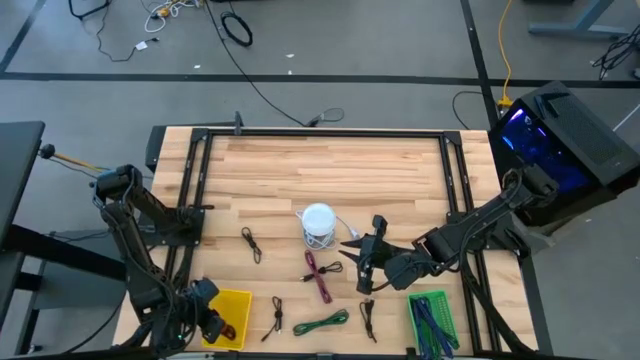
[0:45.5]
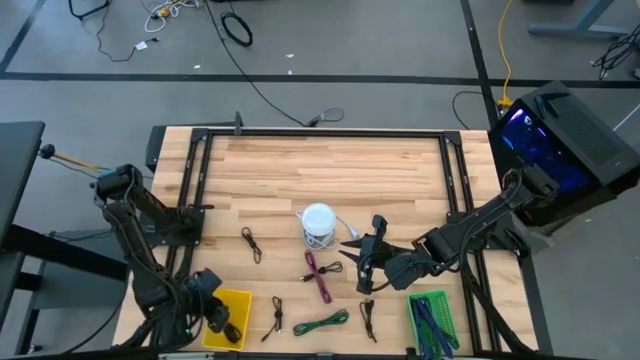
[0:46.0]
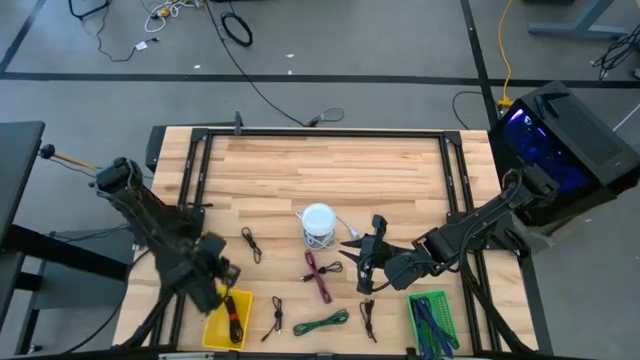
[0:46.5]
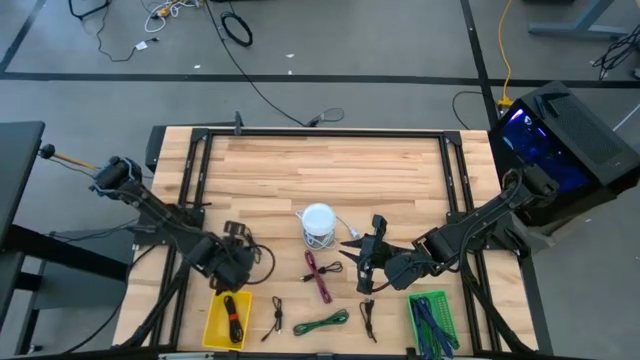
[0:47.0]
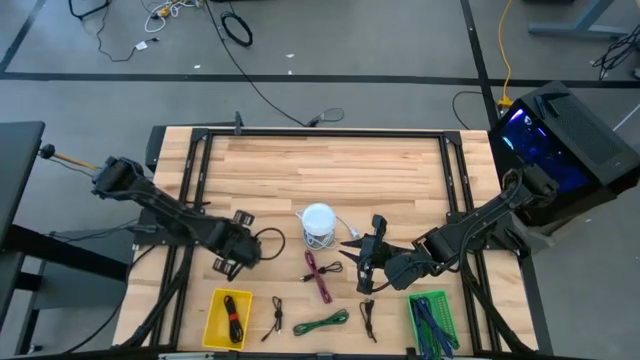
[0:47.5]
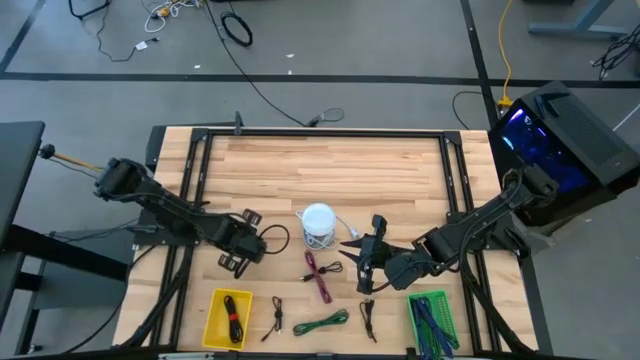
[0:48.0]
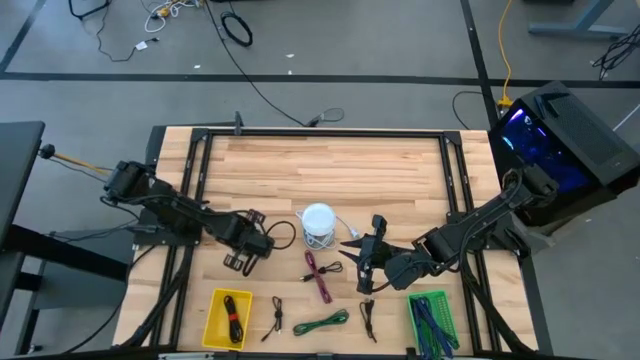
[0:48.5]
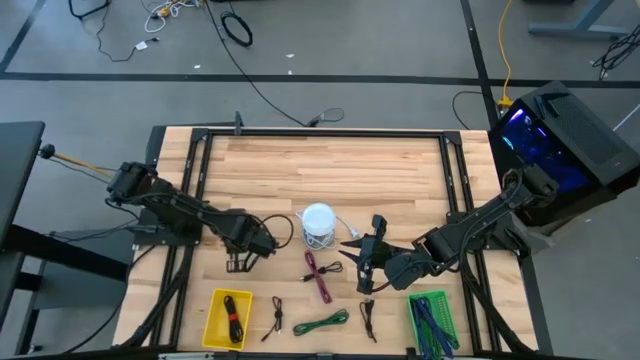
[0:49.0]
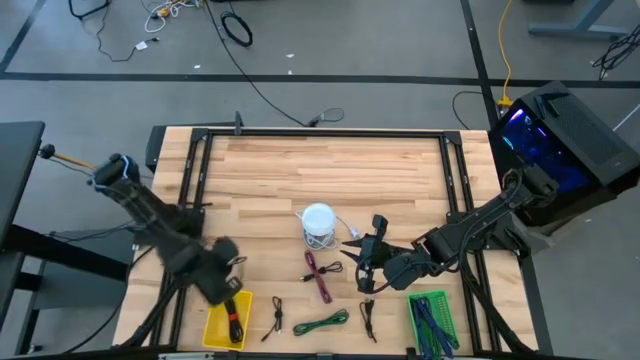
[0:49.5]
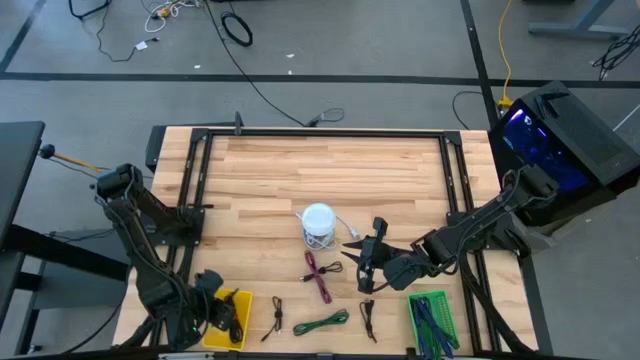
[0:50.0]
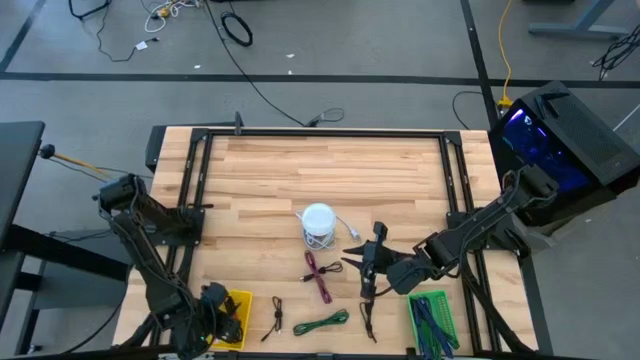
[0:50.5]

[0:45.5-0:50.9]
Task: Pick & Place USB Port
Put the top left black charger cable into the yellow bin

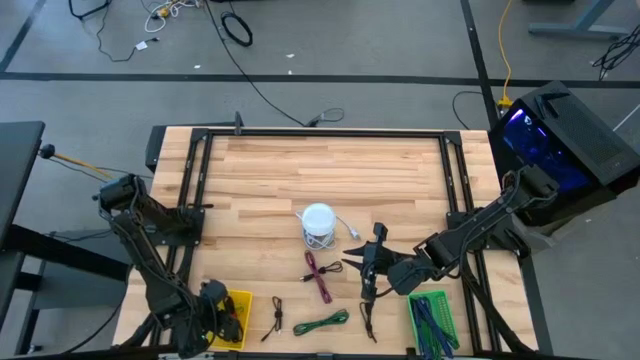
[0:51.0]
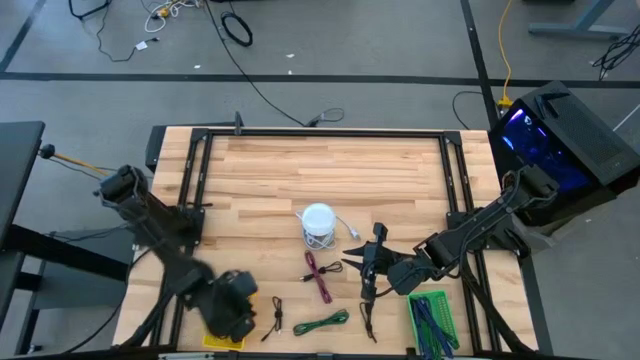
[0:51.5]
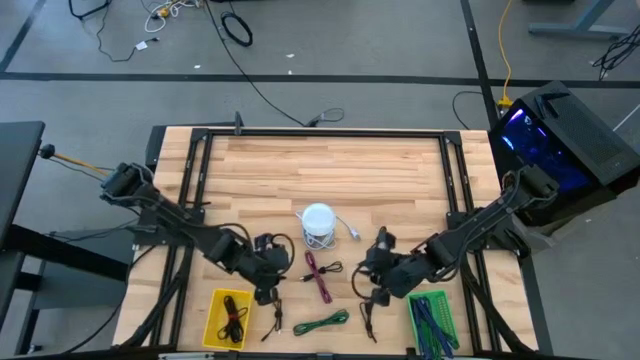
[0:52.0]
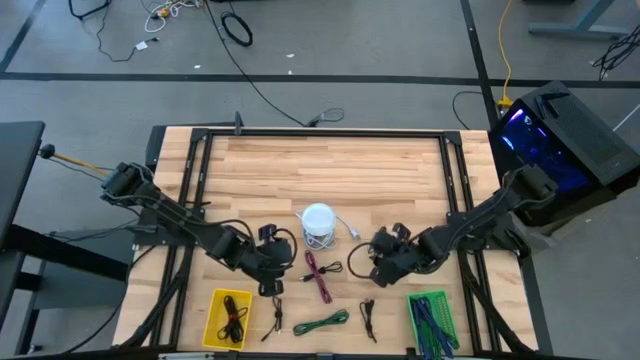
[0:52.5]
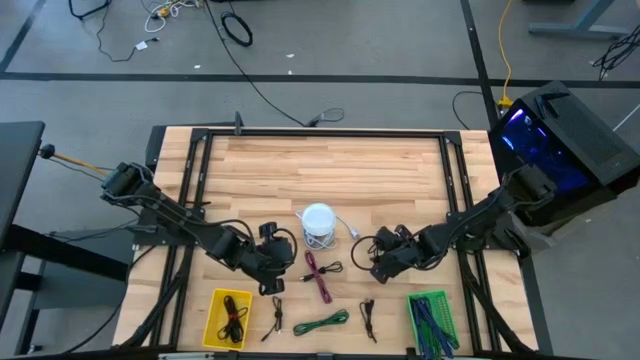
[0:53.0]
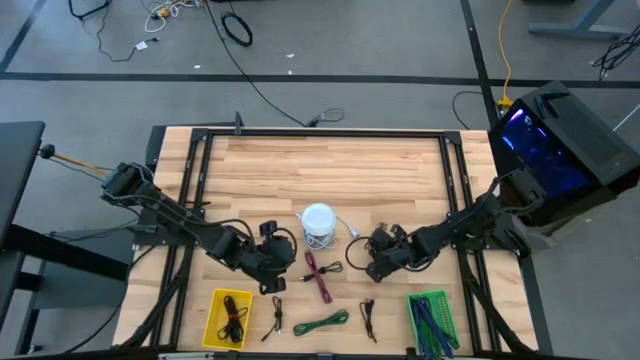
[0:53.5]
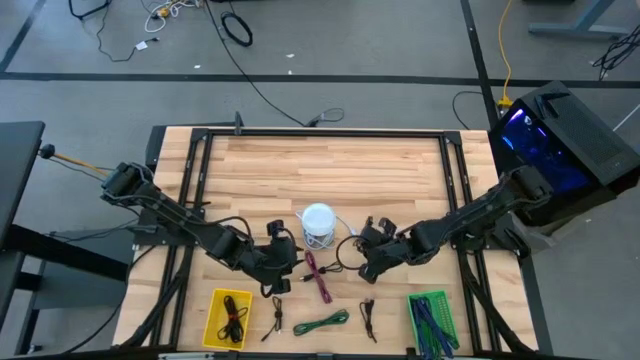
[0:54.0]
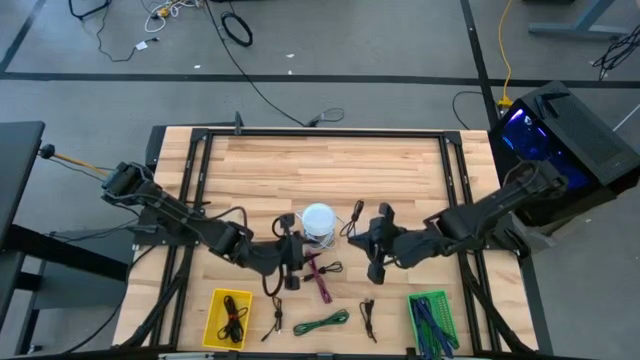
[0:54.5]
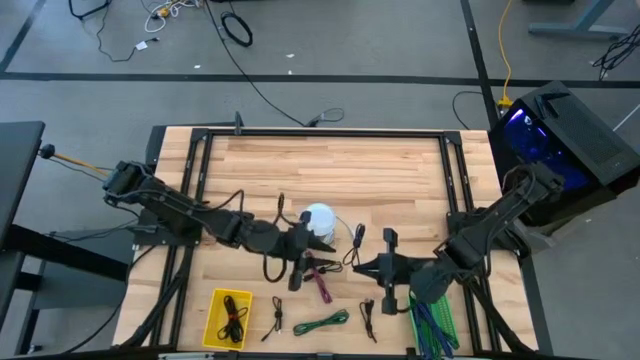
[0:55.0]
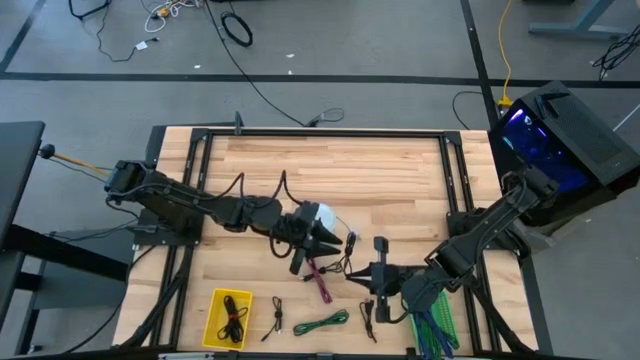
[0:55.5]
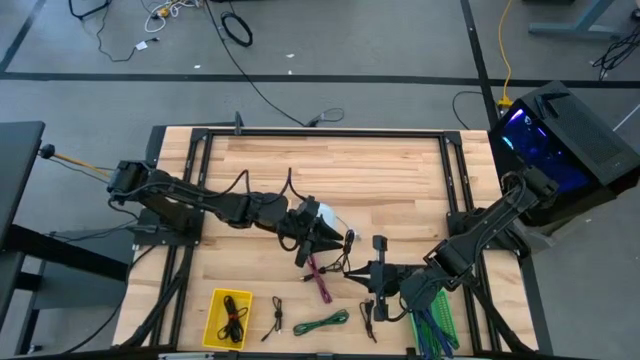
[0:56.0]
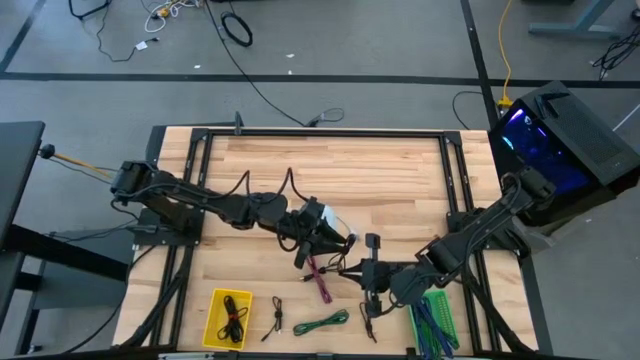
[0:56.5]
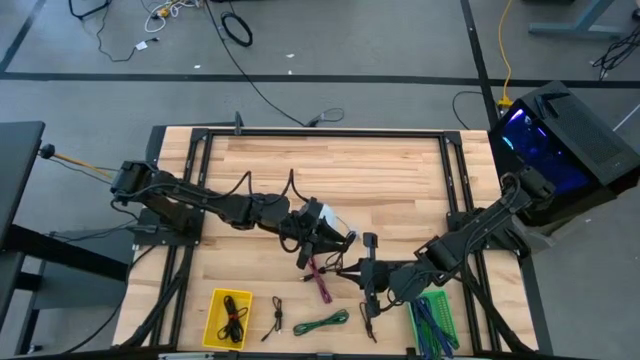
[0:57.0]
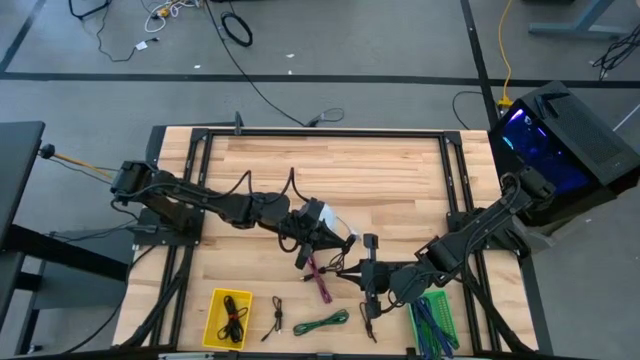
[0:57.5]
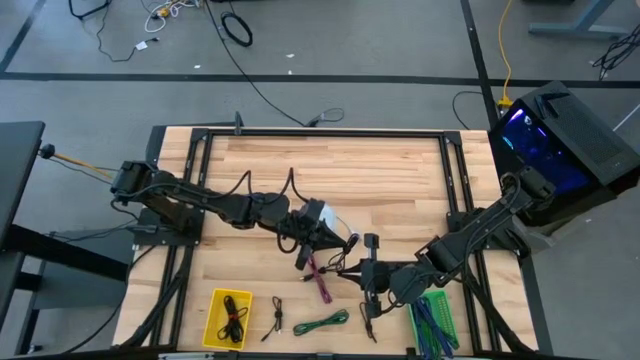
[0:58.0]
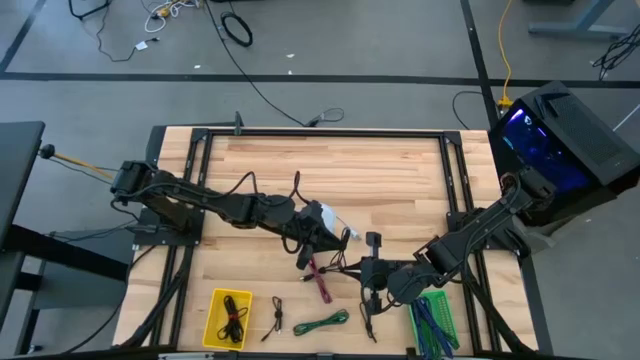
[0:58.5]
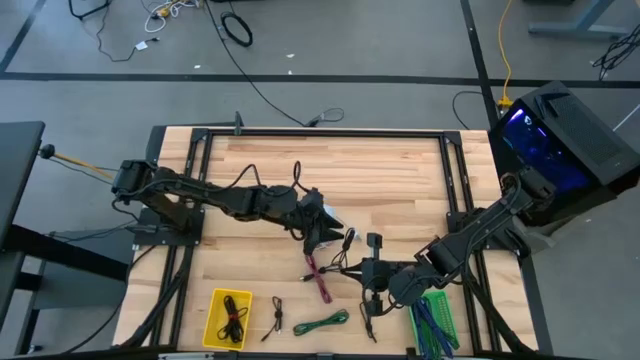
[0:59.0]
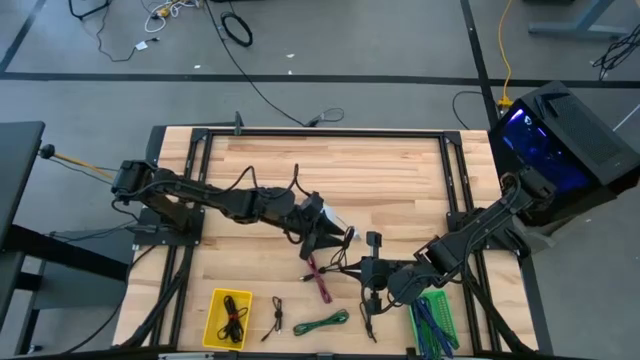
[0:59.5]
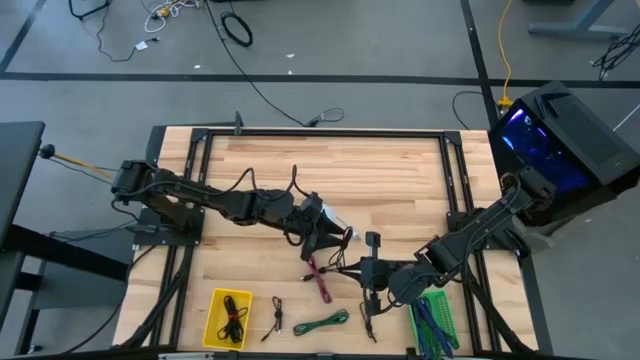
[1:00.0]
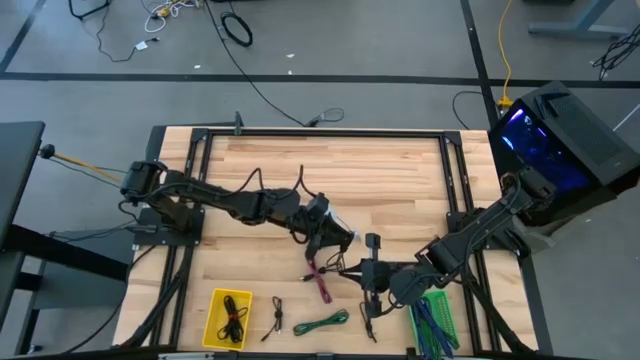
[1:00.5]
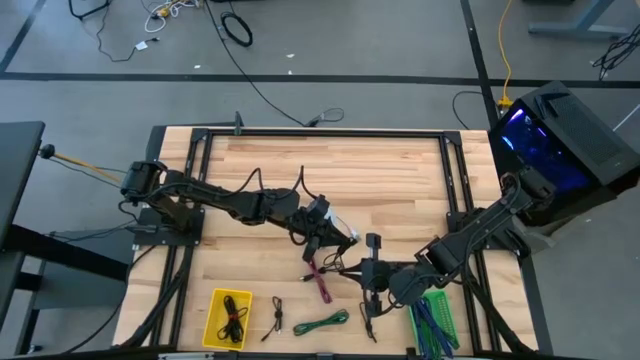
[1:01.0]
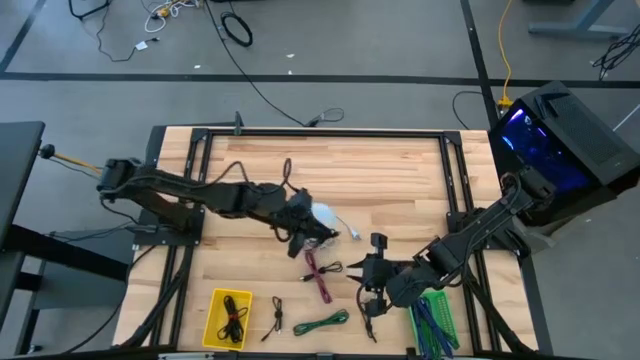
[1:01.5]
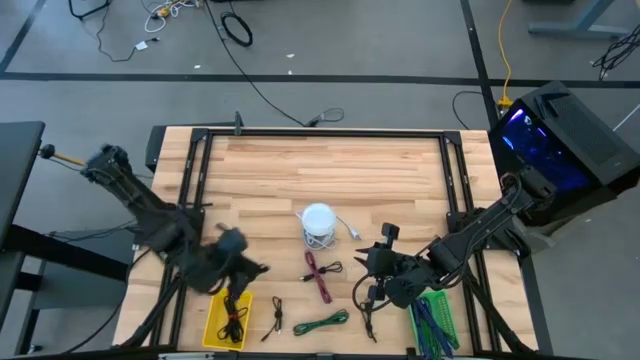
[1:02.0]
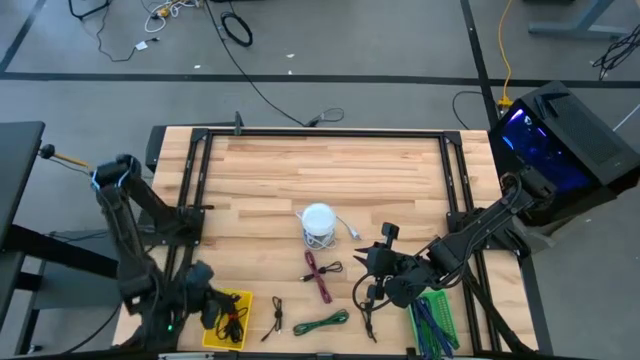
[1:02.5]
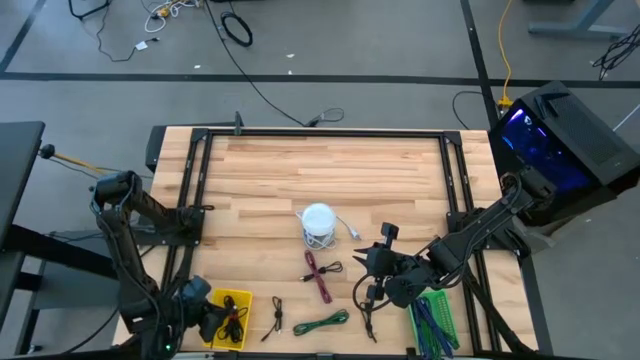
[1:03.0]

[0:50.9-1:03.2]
Put the top right black charger cable into the yellow bin

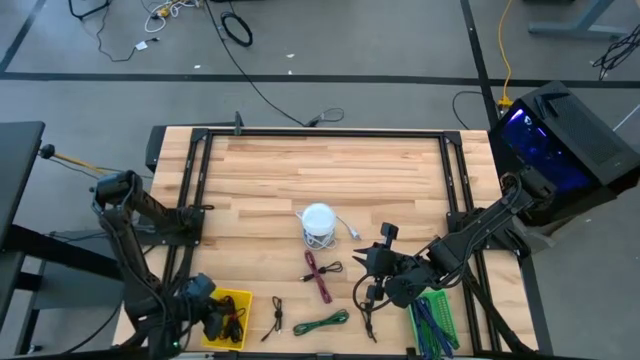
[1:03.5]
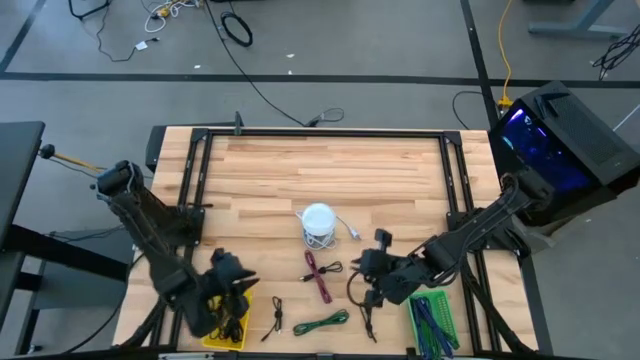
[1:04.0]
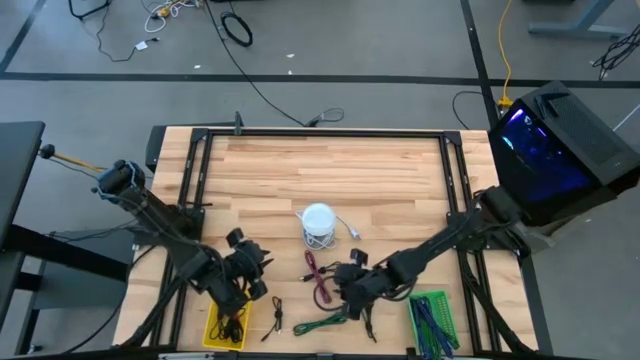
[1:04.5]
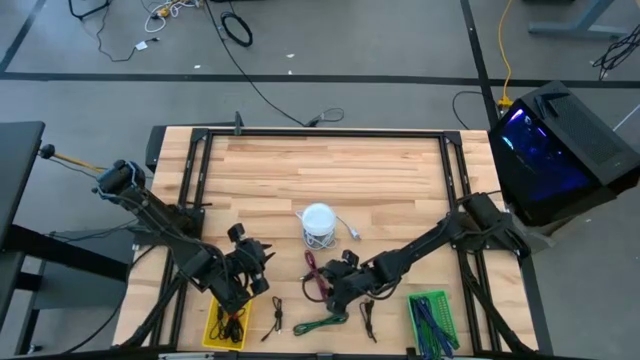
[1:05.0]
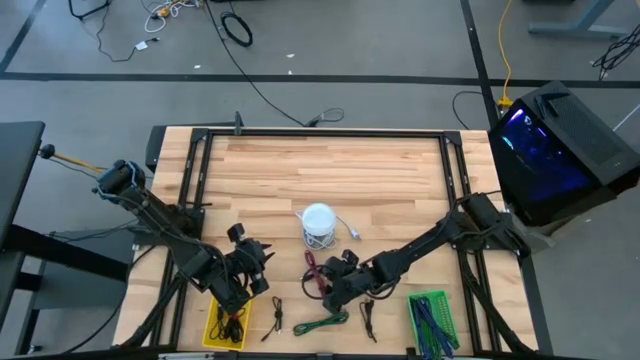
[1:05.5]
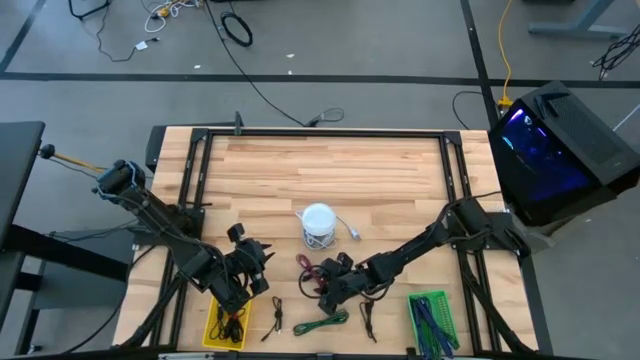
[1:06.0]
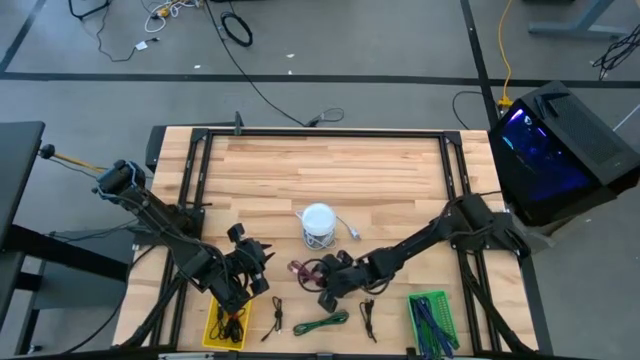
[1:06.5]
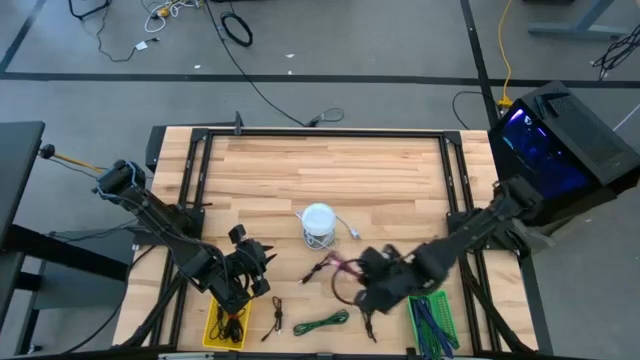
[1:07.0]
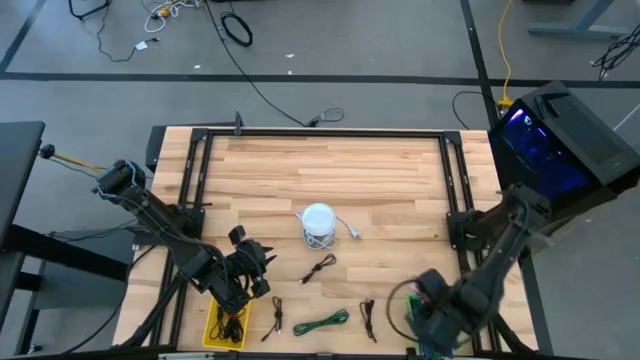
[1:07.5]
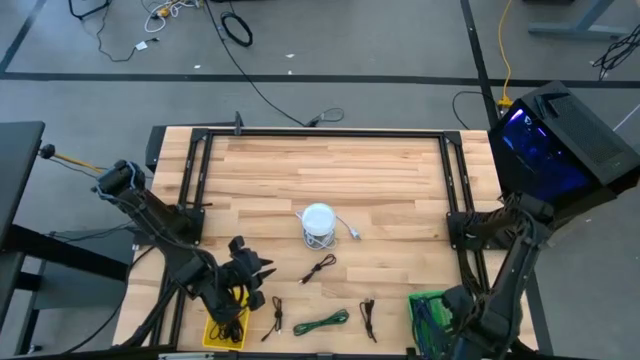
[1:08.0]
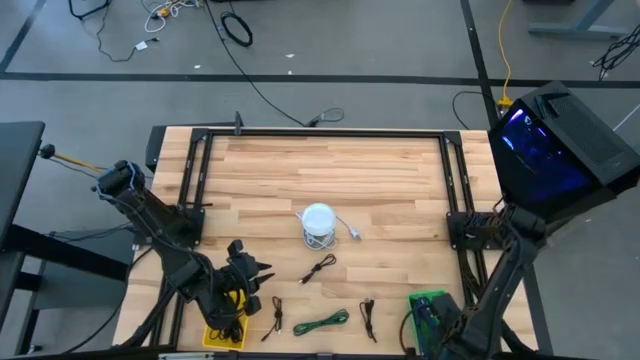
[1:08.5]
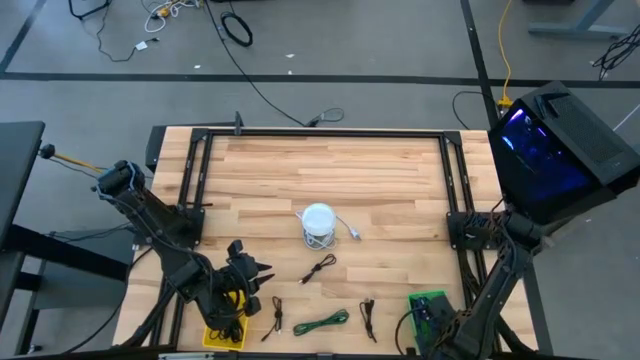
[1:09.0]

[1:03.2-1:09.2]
Put the pink charger cable into the green bin
